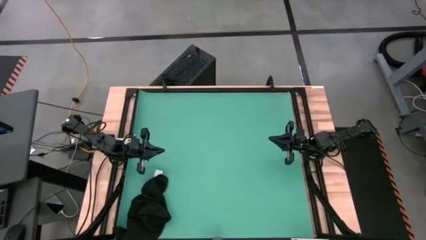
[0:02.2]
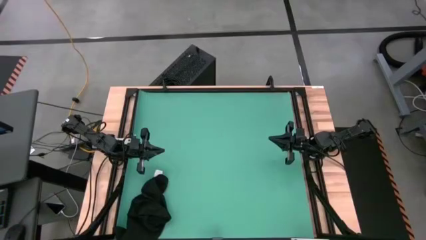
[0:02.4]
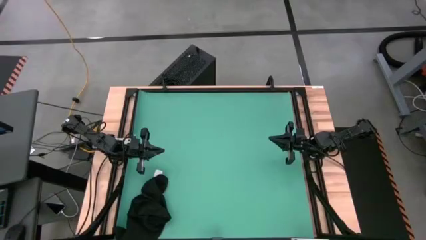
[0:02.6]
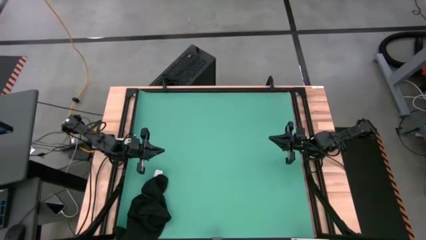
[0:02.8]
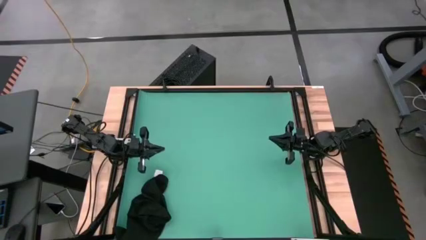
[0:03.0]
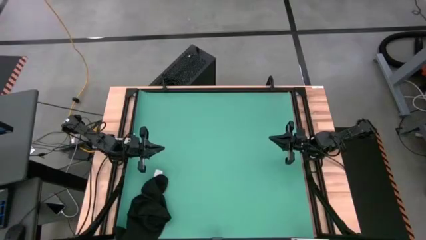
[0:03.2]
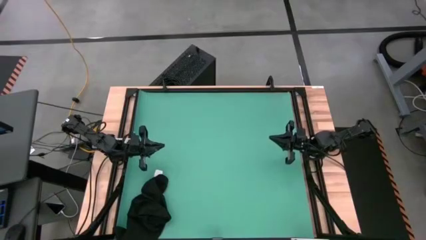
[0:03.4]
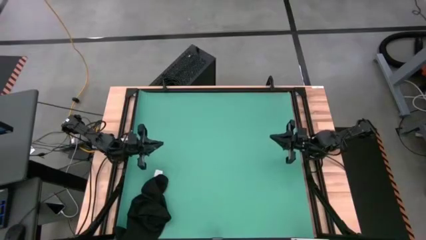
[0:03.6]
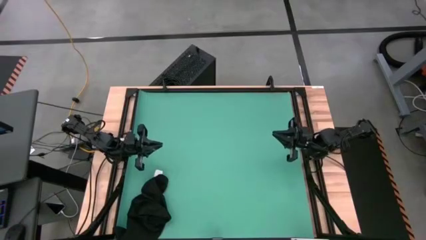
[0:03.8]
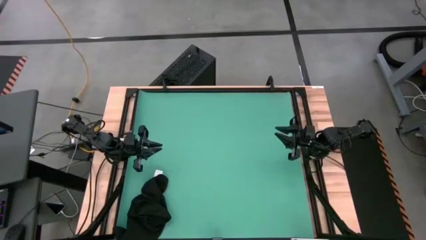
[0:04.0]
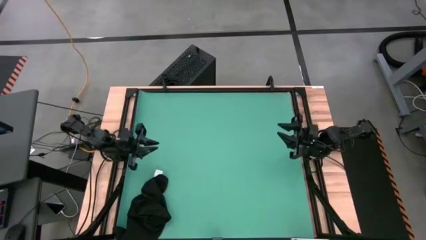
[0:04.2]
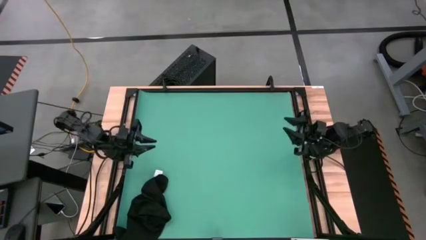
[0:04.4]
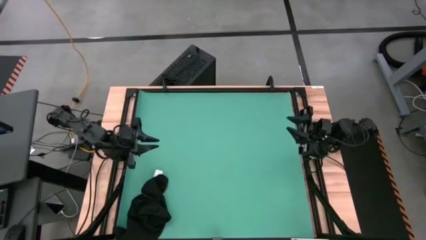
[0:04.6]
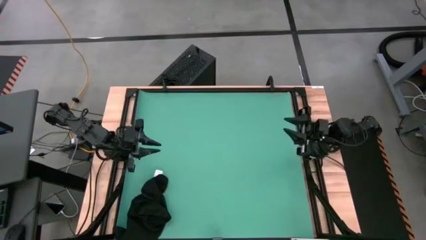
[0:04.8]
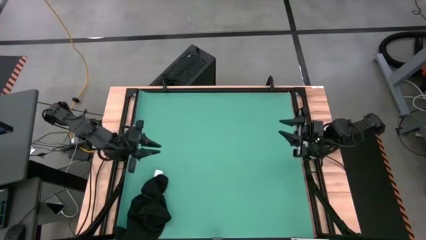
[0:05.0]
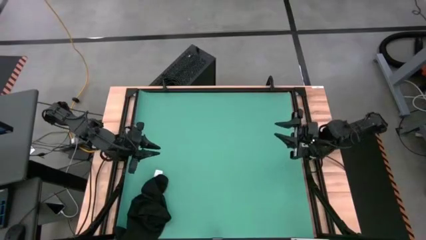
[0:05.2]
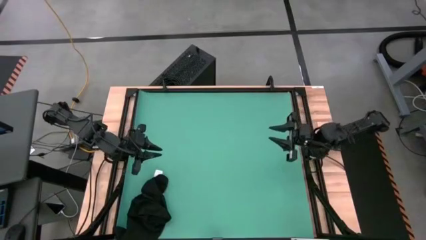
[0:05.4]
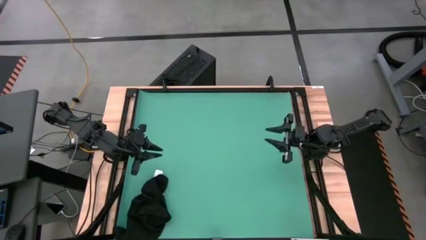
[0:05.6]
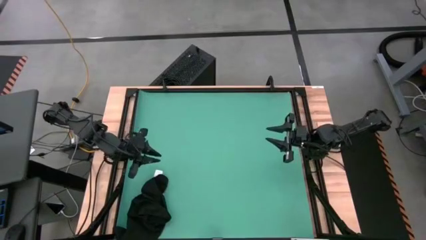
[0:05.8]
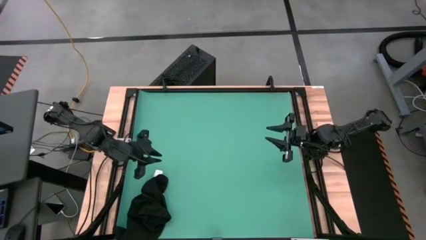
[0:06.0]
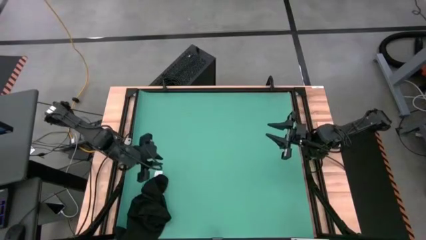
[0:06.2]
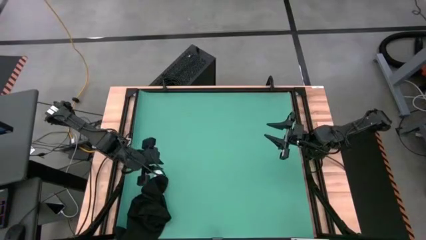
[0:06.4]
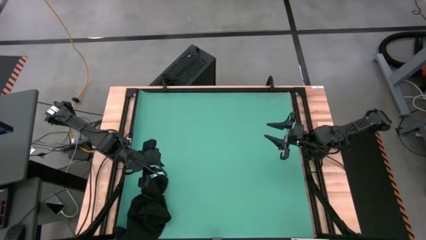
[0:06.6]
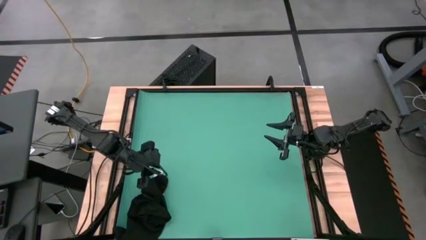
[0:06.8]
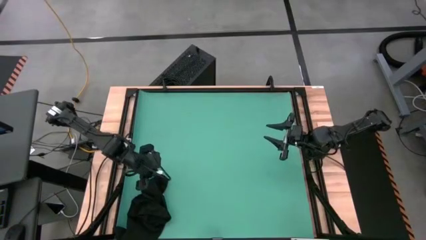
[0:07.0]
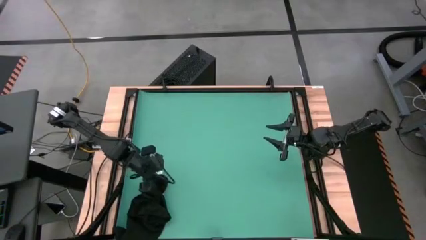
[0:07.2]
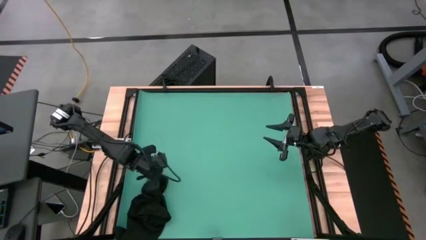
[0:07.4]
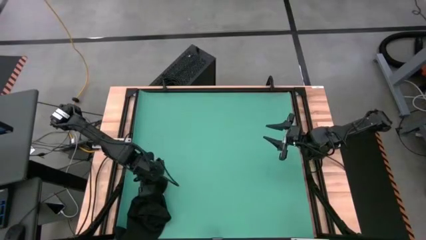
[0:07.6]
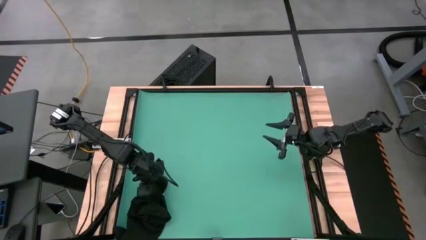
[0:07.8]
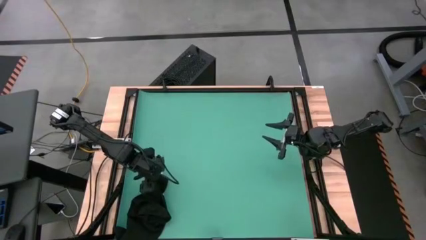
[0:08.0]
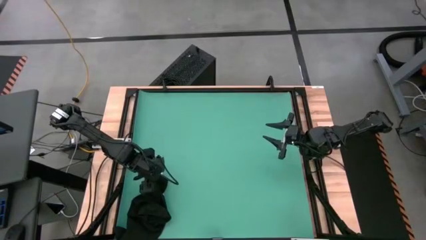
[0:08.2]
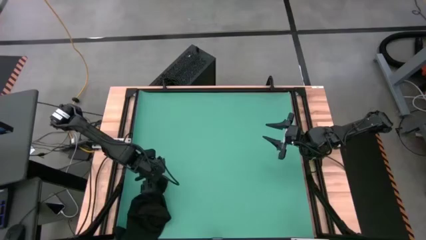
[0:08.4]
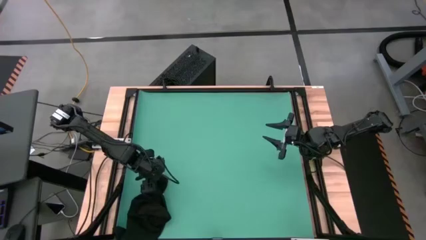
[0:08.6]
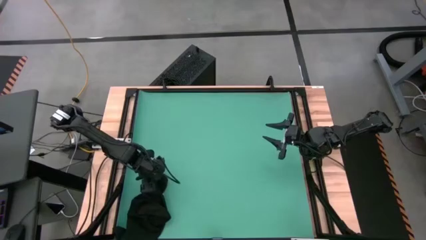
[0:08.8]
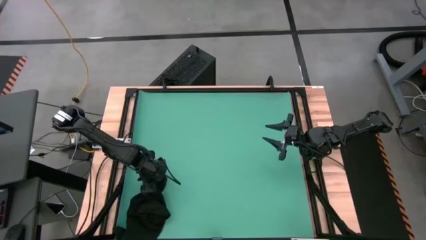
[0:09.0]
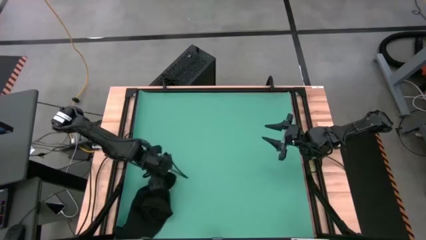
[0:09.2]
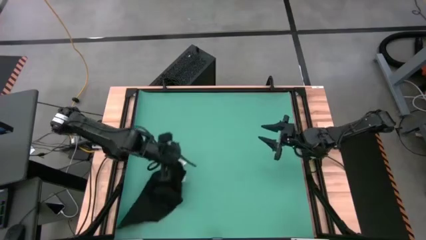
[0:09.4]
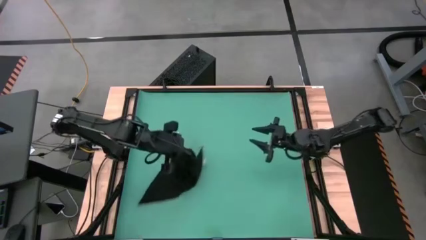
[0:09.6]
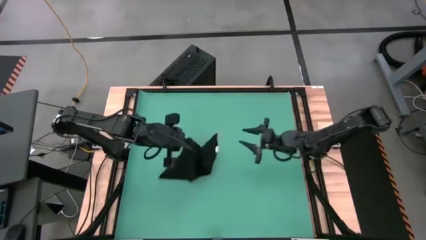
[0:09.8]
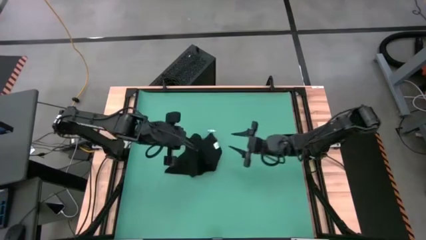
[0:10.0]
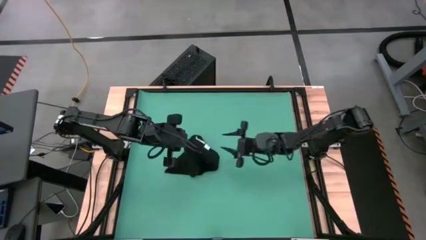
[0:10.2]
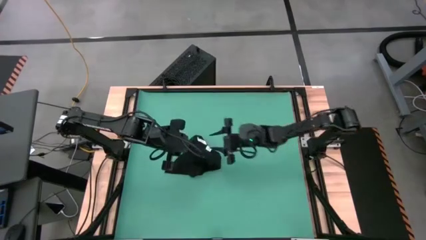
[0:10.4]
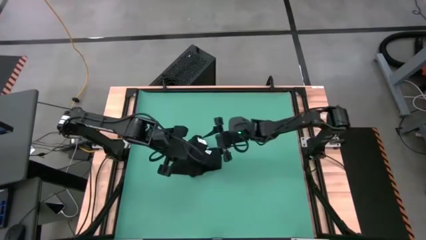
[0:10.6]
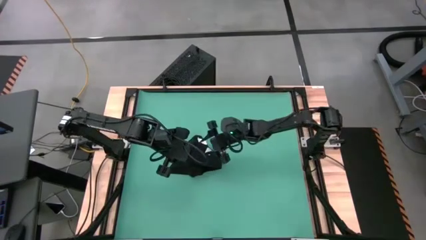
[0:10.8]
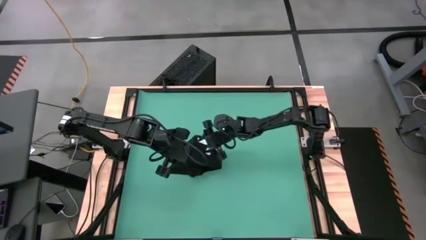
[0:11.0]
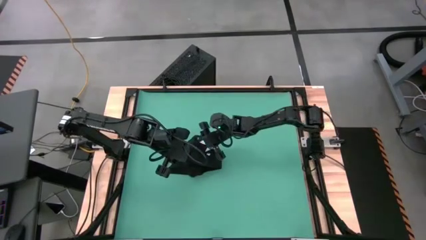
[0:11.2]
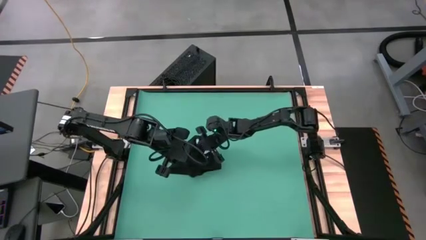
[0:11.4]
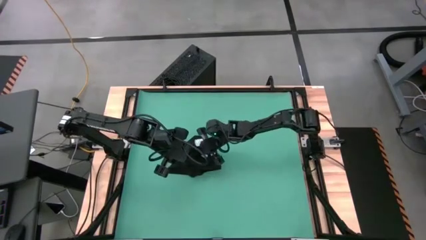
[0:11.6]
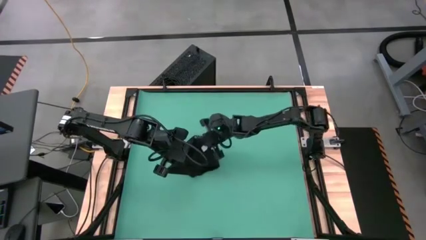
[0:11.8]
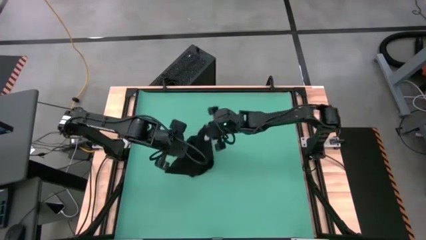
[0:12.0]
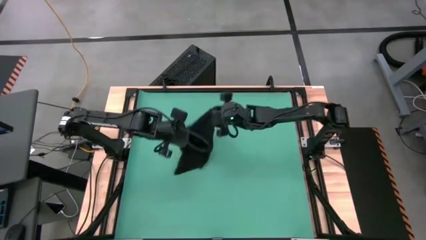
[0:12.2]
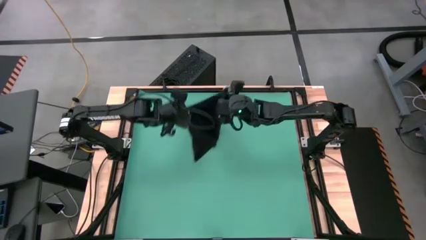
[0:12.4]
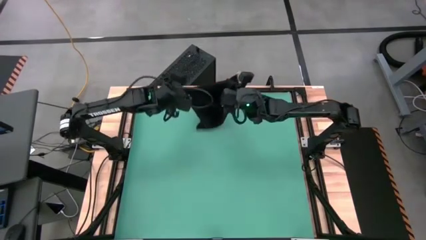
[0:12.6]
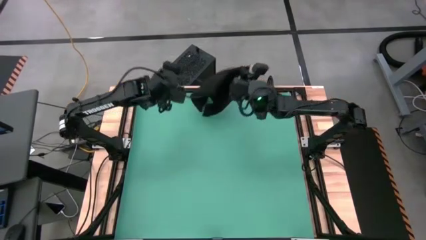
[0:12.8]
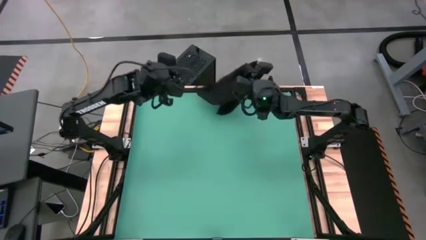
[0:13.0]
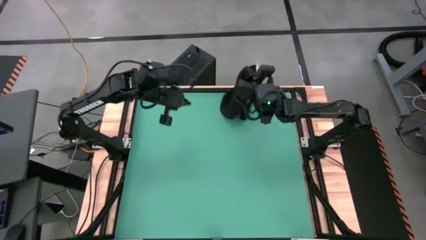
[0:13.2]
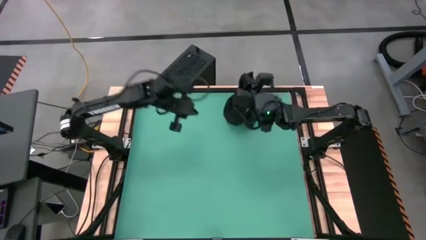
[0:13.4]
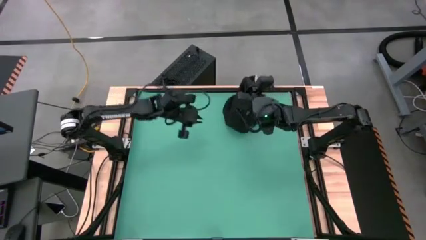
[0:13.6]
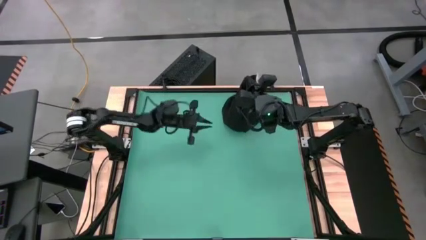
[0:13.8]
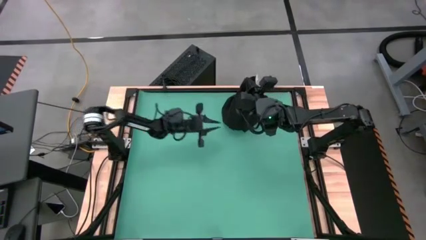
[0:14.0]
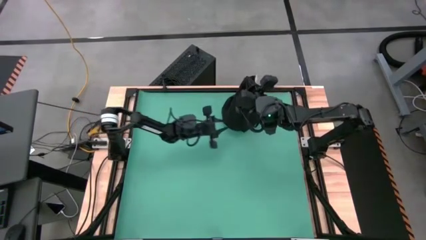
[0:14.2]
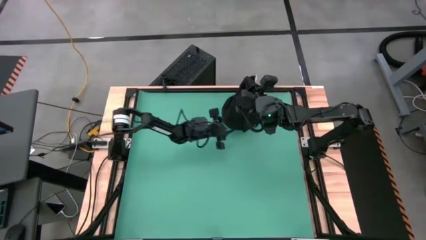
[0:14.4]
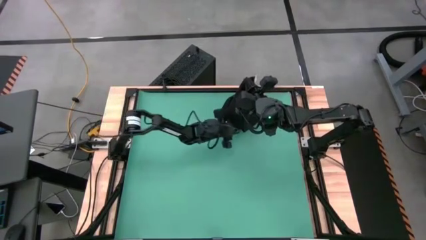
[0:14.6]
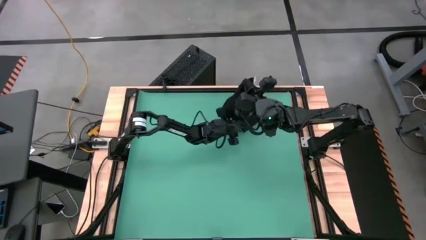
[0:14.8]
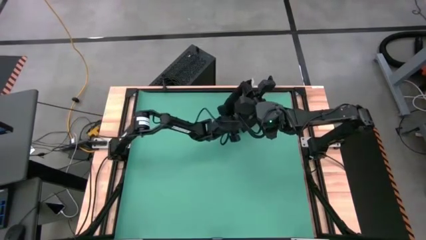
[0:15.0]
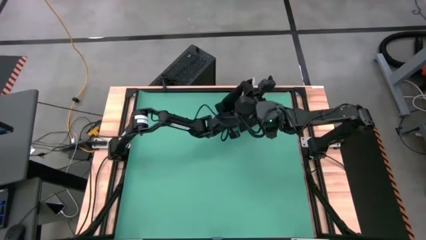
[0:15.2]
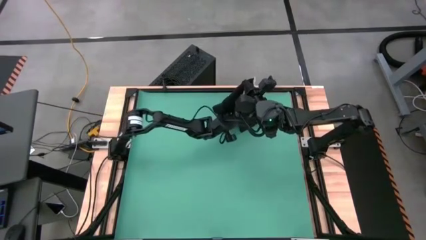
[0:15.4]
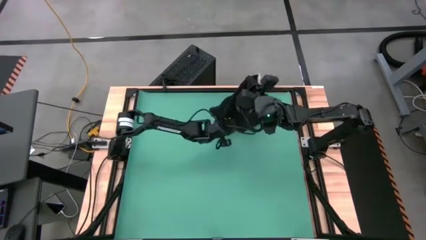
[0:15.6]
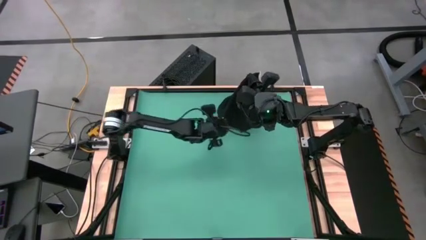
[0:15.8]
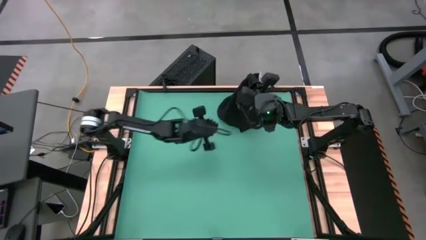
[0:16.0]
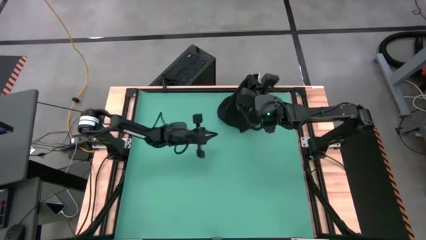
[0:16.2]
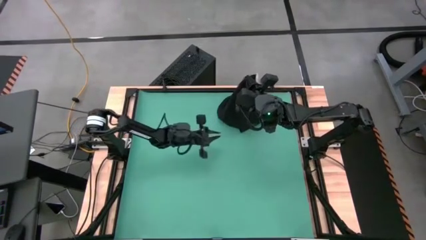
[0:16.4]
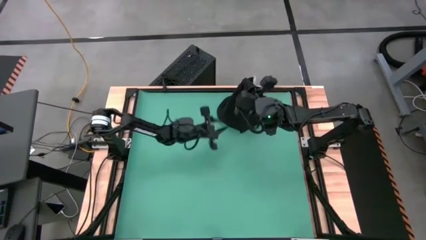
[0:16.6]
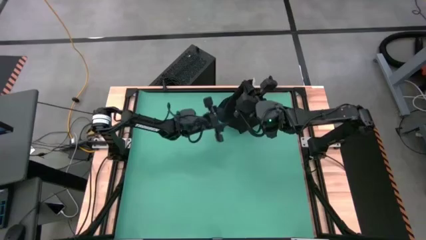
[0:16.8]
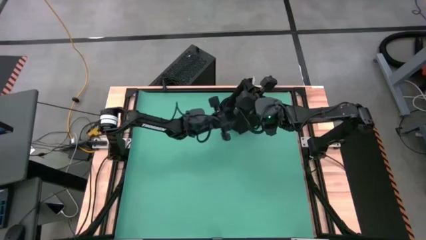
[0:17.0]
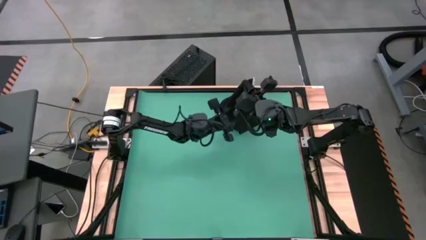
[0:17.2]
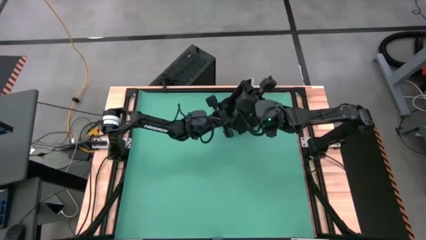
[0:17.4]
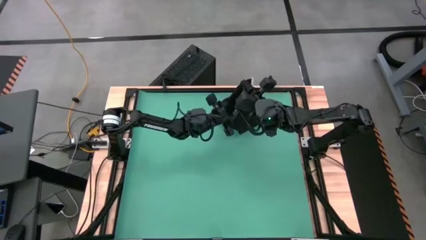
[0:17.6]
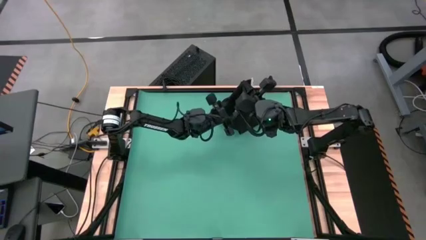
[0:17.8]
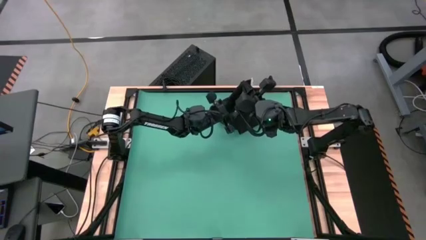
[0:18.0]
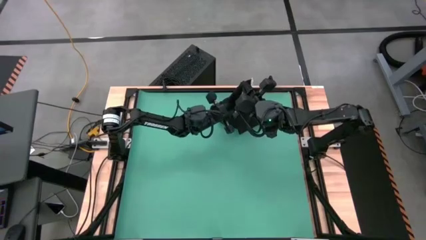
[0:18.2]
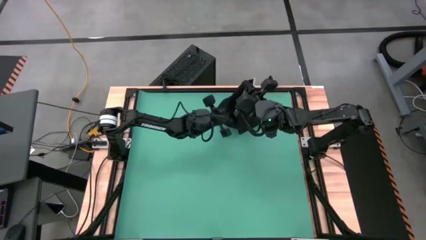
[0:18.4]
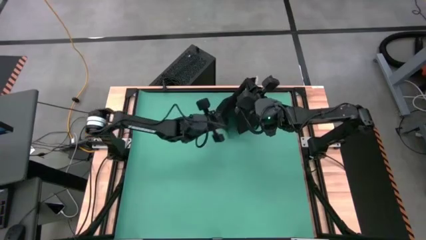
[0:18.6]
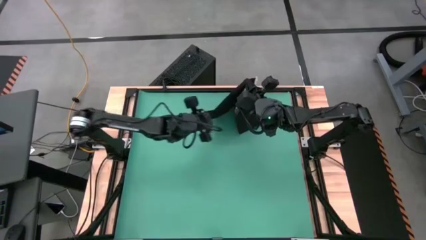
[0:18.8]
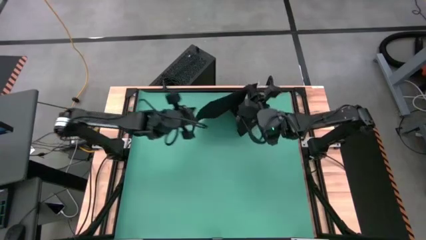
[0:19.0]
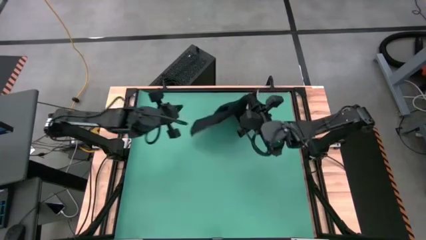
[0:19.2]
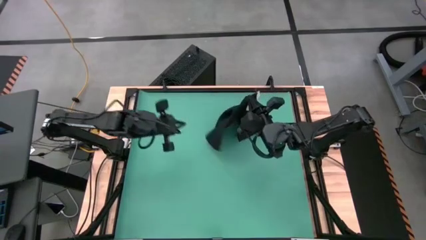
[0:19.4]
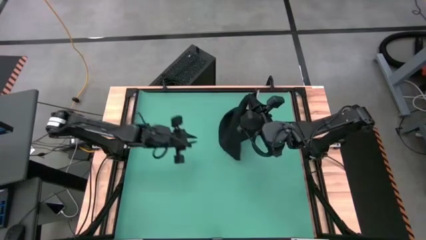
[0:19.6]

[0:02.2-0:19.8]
Task: Roll towel
Fold the black towel
